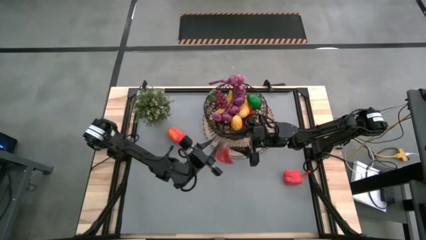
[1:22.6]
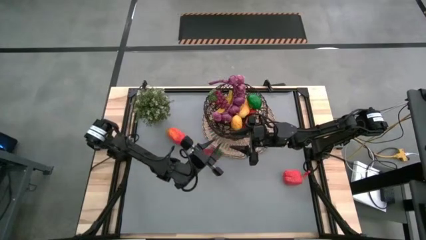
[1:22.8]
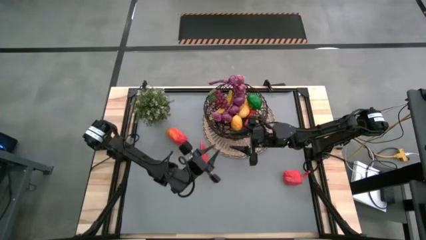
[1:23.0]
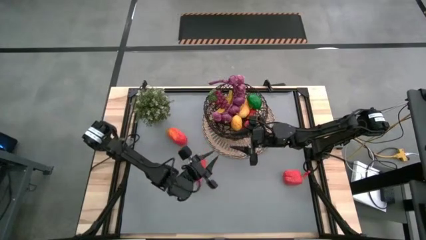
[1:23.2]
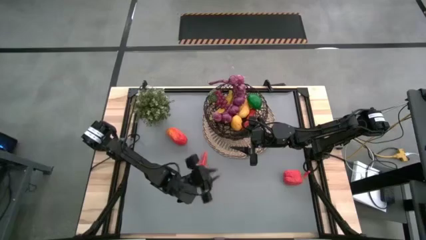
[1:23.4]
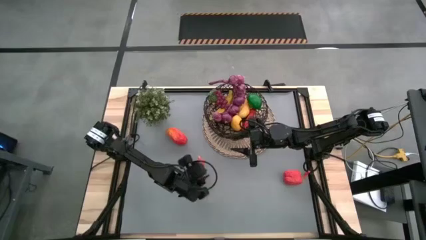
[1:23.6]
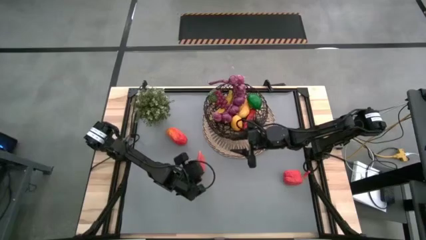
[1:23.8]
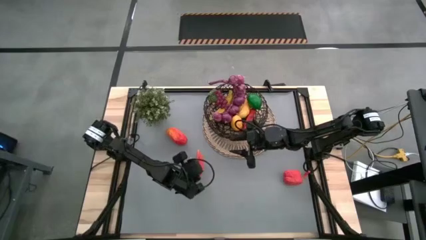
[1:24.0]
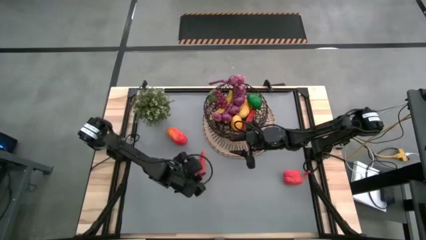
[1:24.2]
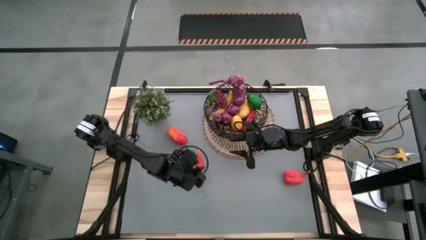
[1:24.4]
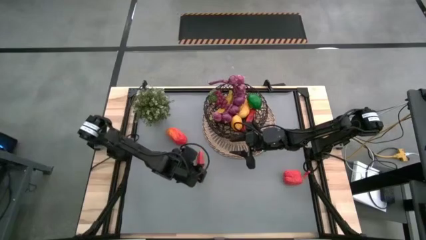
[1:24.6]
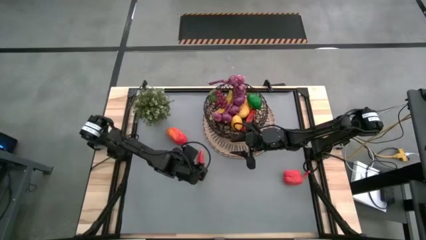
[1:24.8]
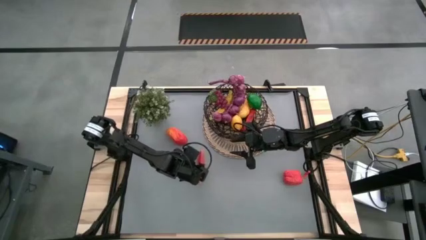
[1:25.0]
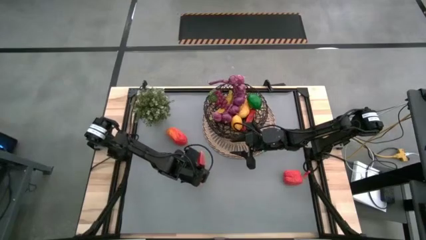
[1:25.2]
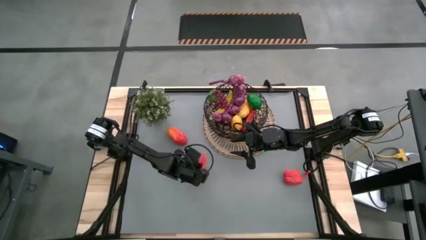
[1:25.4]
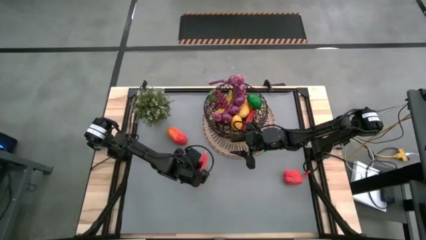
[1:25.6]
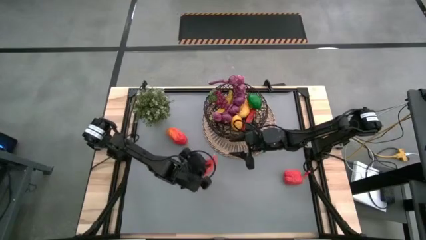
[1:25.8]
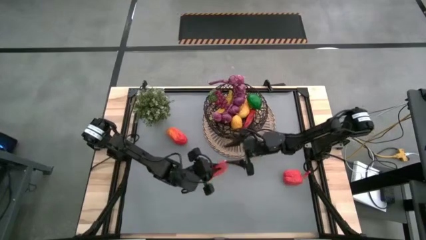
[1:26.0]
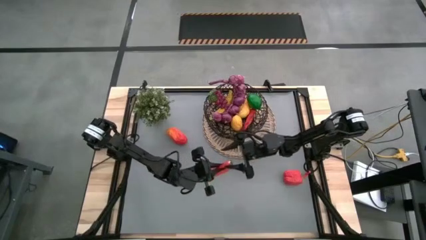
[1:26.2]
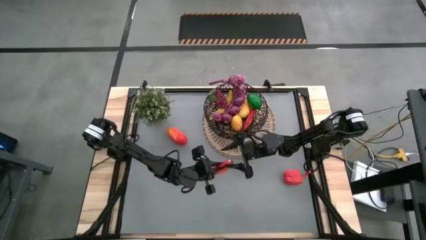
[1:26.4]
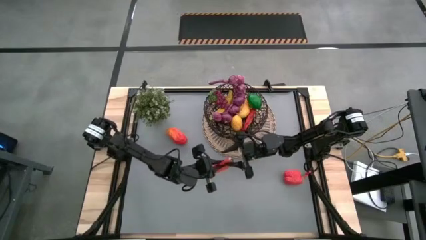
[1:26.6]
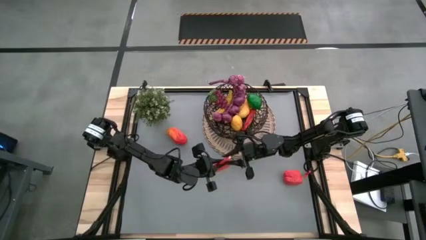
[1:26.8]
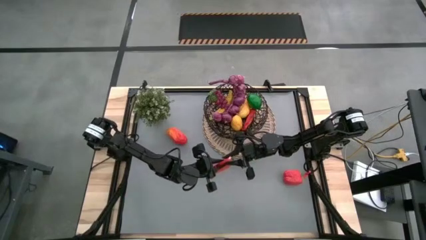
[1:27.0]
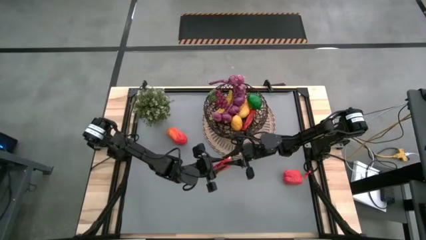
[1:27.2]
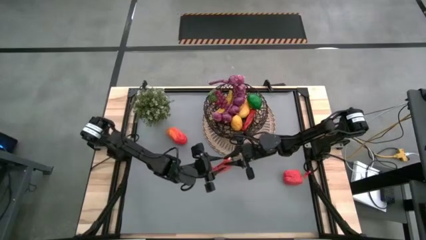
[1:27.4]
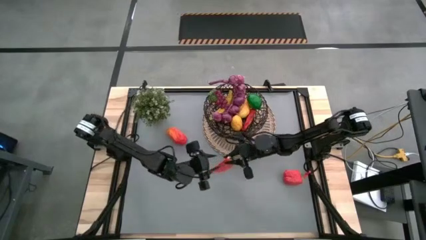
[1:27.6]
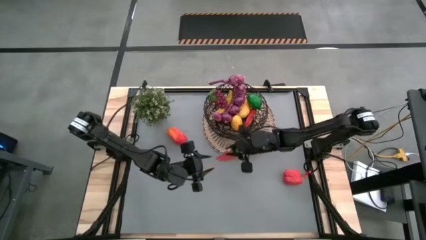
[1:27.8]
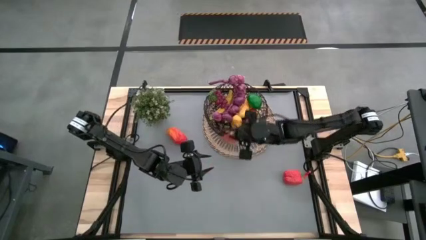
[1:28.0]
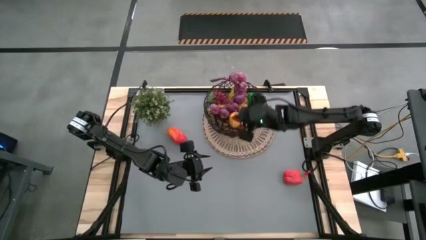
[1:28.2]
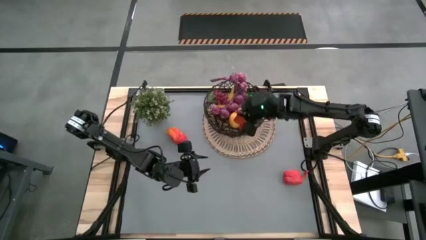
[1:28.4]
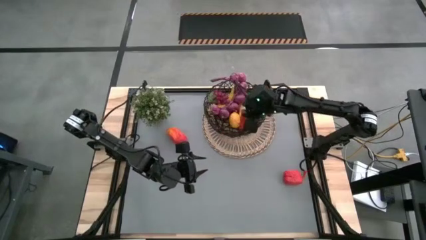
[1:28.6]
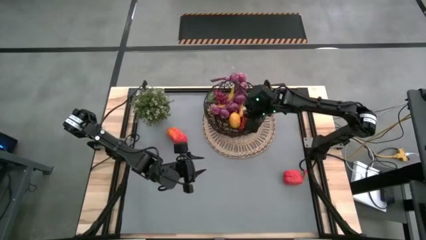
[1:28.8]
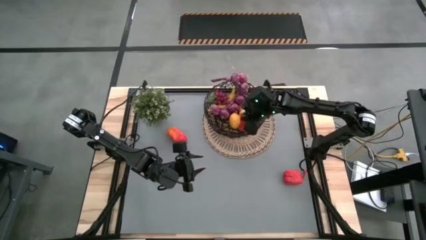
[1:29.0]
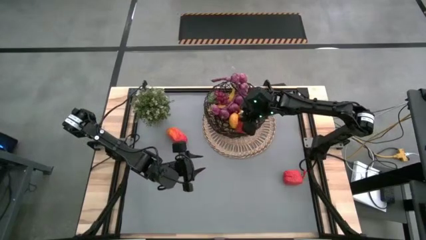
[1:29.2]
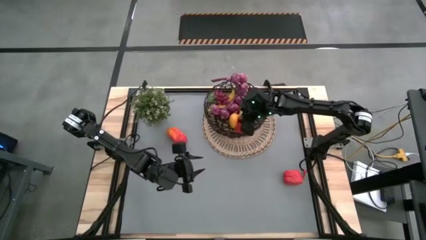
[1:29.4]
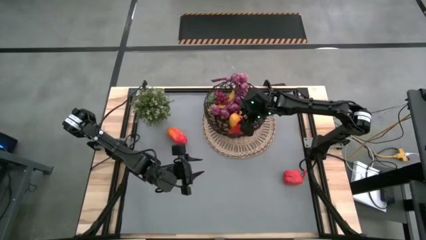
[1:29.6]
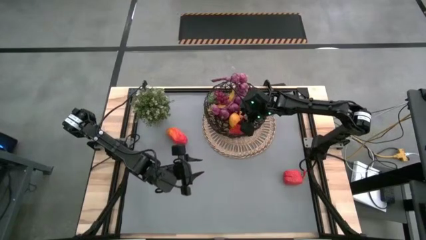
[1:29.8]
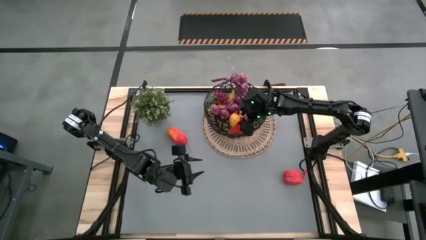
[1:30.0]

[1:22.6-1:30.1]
Task: Build produce basket
Put the watermelon into the black wire basket

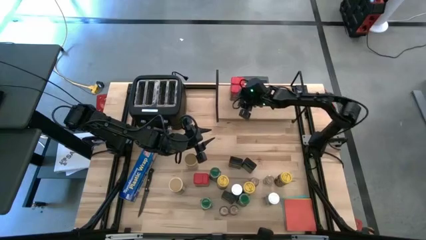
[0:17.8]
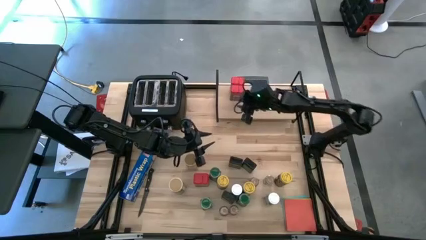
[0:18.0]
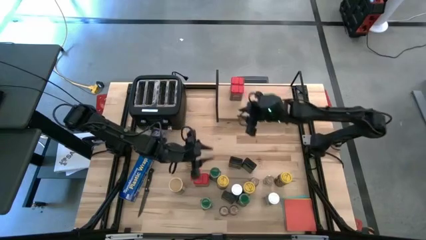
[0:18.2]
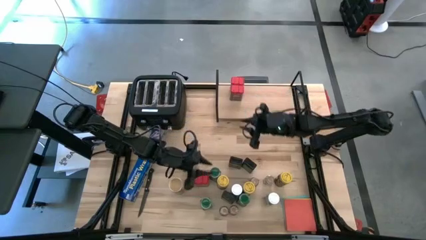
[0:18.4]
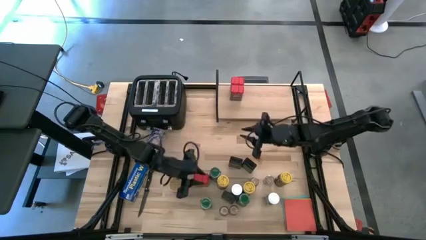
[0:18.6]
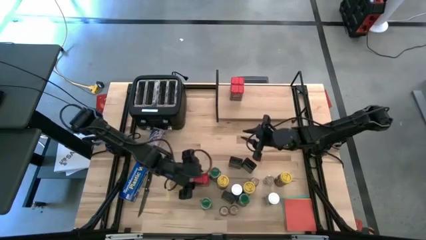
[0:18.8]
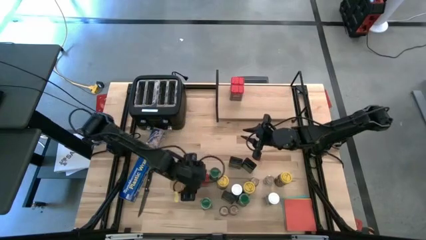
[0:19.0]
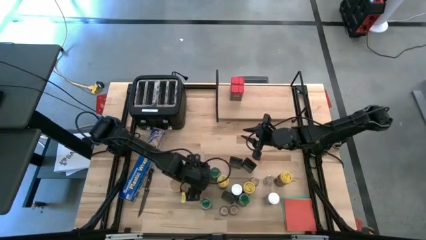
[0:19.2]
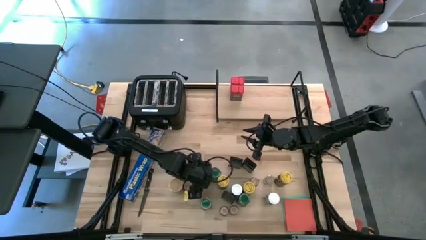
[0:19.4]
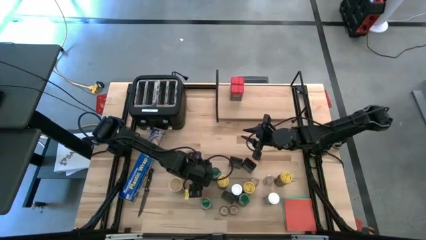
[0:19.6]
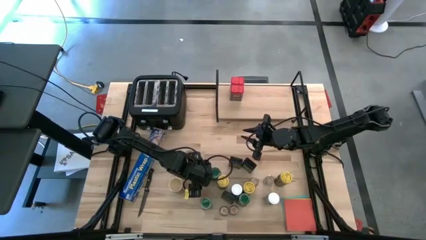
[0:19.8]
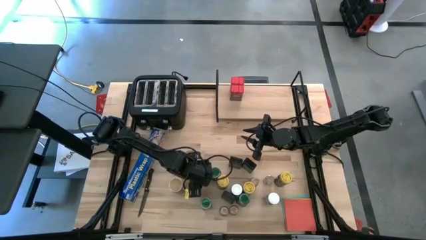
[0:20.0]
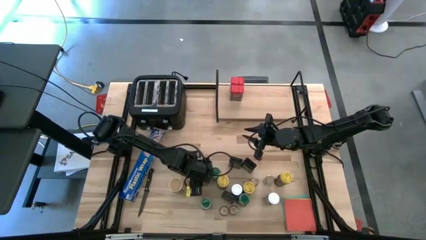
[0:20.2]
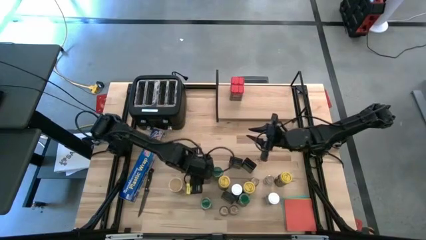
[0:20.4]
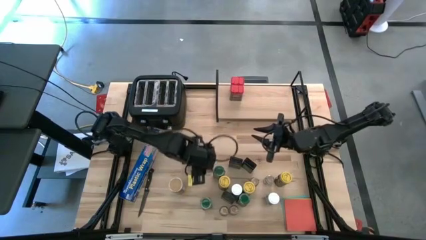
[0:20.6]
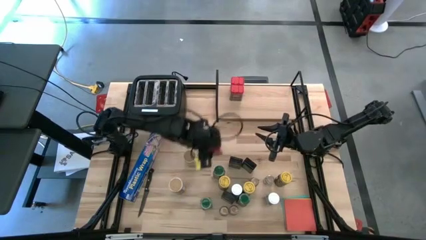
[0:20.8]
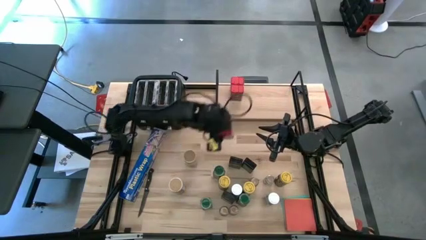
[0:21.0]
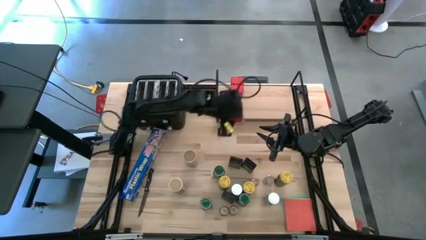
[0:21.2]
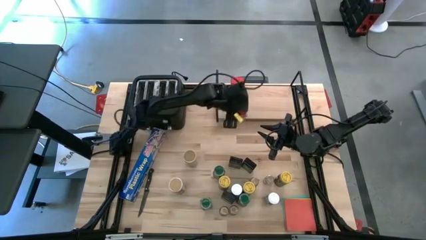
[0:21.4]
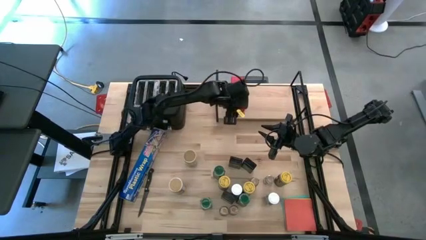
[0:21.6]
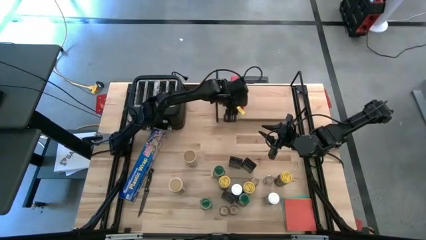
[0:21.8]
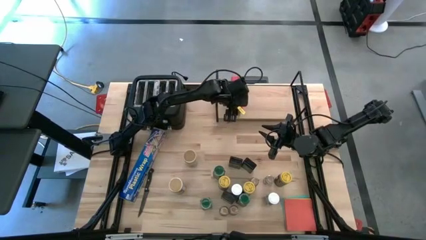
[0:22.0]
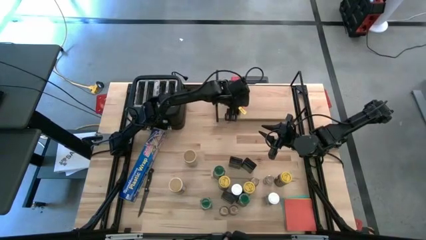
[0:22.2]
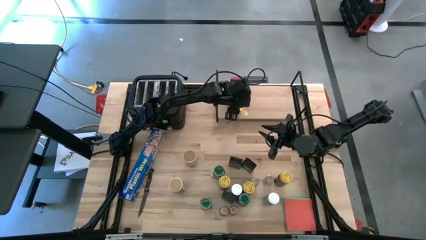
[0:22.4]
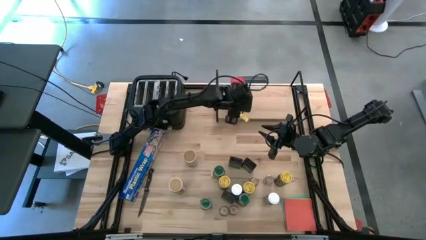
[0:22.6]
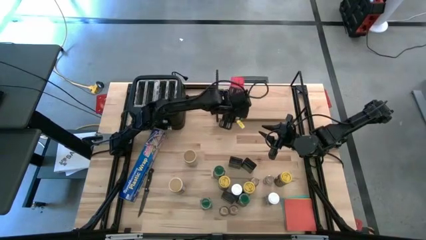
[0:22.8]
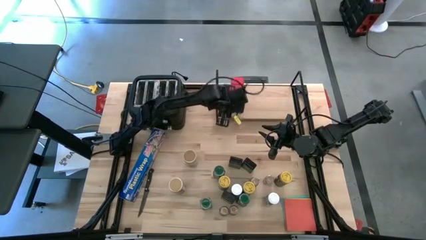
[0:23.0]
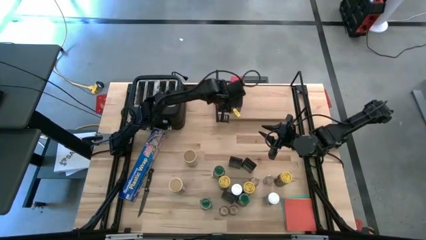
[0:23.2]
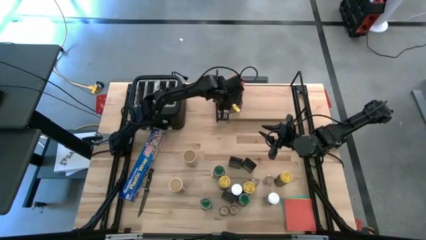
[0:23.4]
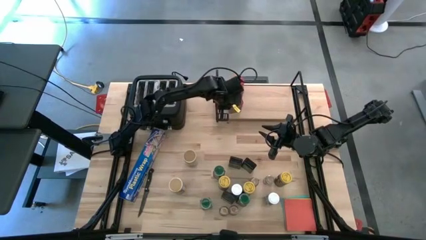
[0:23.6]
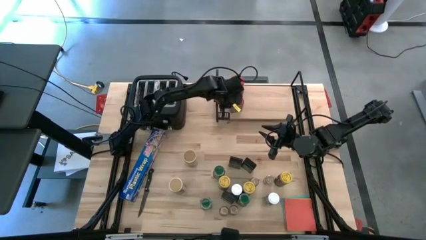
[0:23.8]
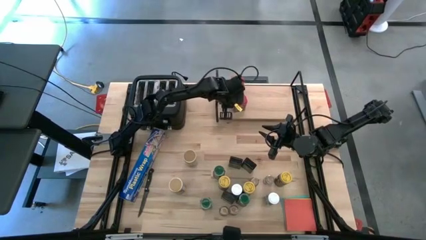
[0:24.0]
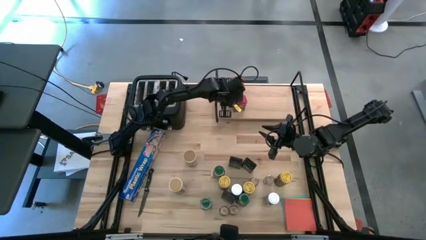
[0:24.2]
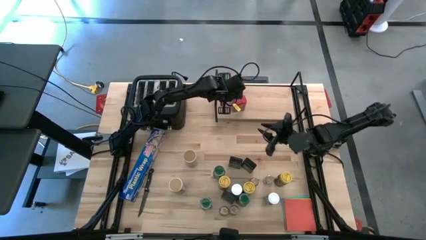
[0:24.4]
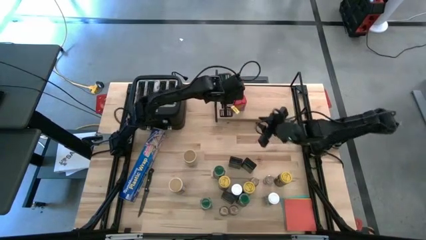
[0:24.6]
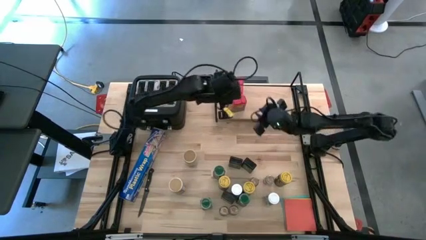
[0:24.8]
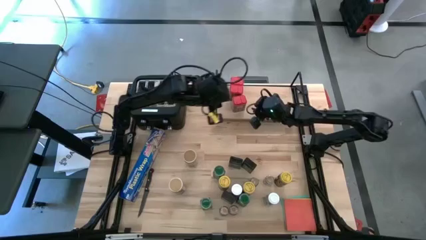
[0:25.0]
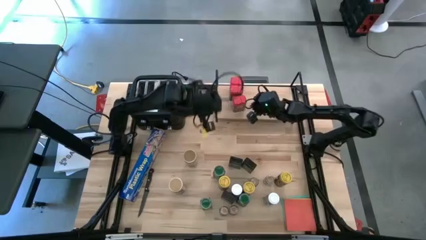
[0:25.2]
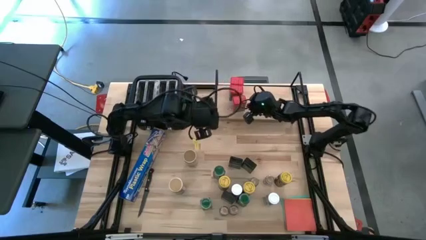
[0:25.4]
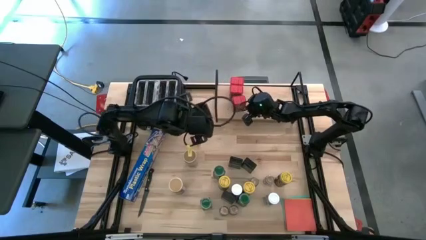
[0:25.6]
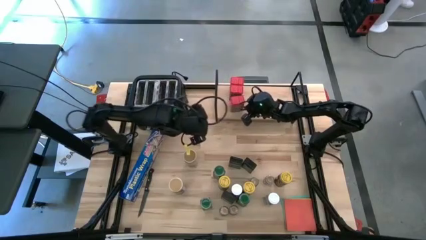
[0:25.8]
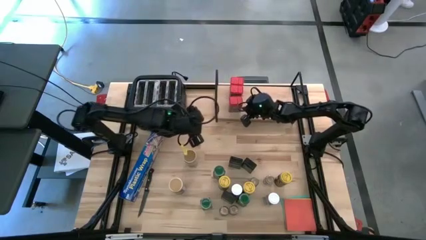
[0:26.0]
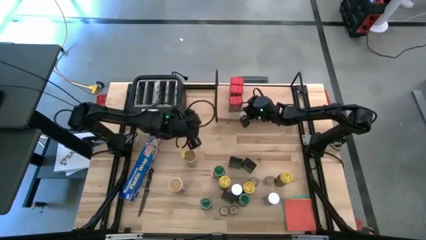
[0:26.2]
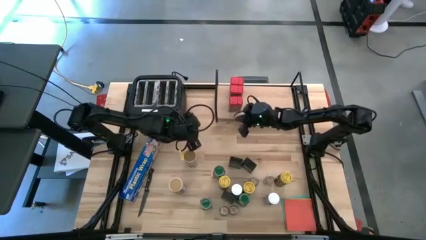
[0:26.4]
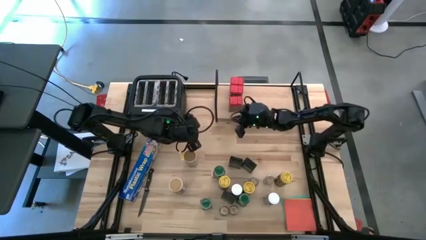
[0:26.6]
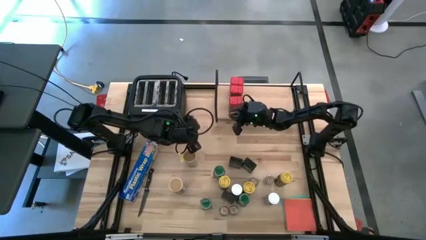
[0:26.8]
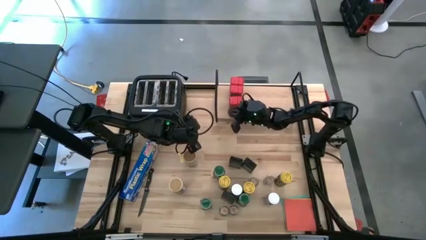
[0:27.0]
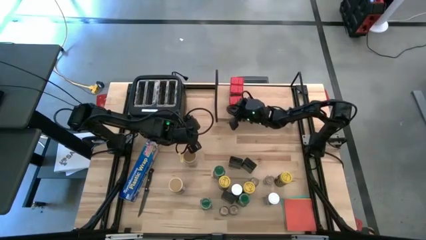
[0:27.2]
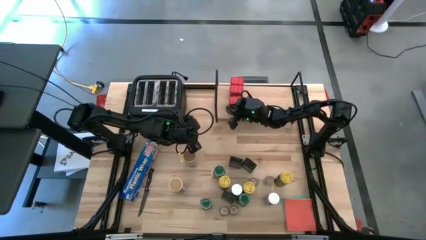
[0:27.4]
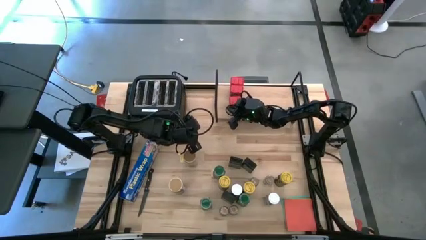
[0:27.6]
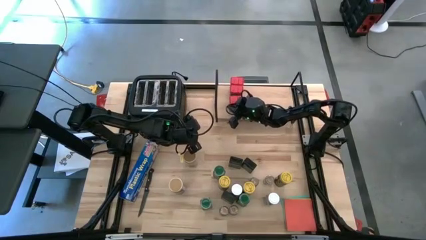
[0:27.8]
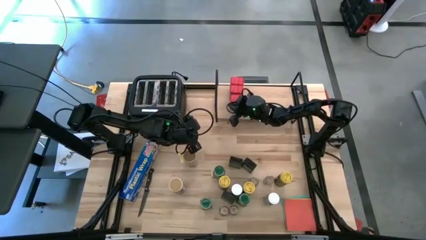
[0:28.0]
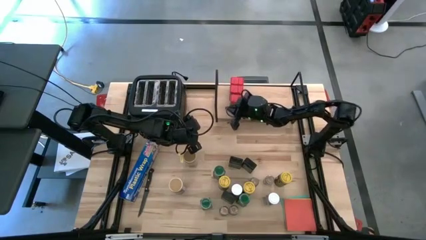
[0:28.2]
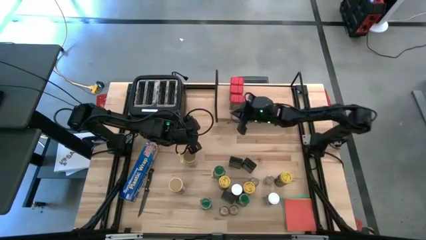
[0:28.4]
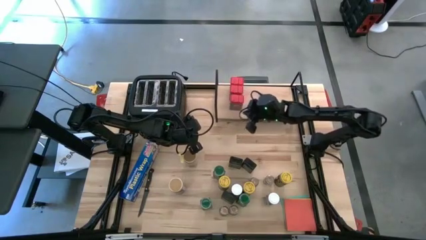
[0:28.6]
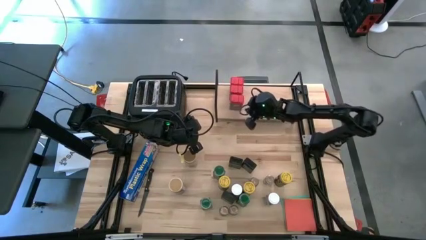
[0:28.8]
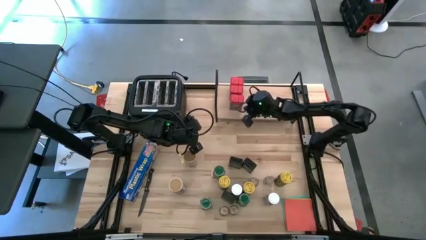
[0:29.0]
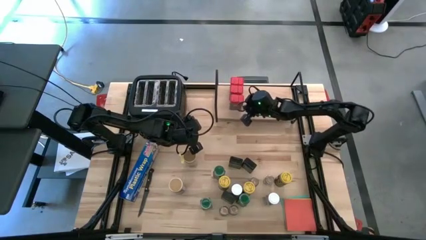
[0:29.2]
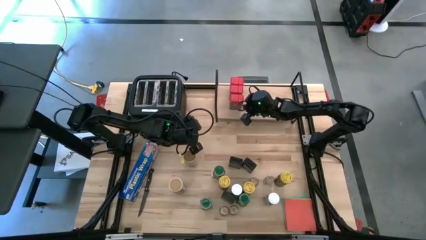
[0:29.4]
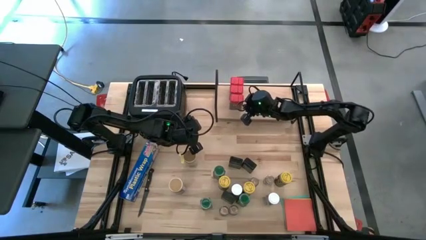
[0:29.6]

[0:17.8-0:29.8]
Task: Shelf spices
Put the red seasoning can on the shelf aligned with the other red seasoning can
